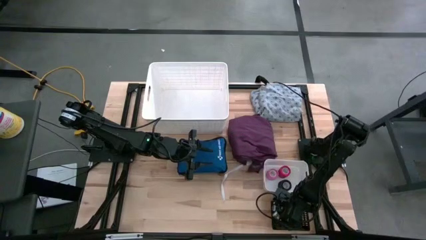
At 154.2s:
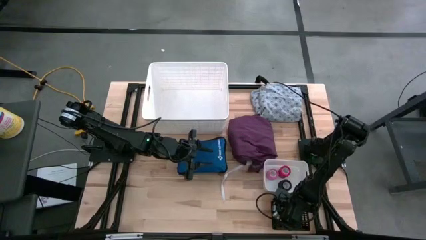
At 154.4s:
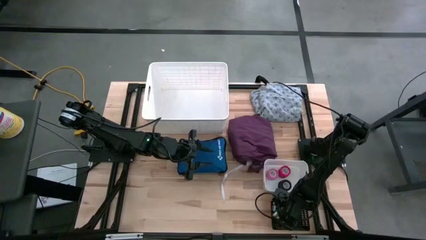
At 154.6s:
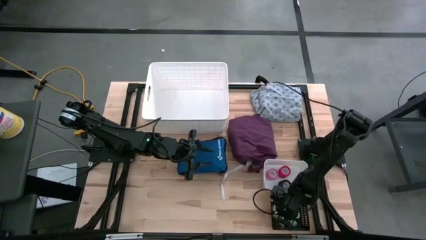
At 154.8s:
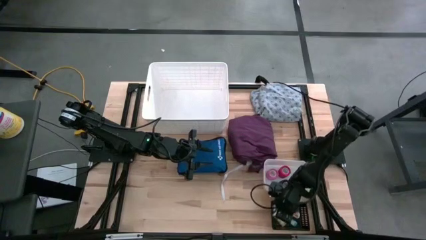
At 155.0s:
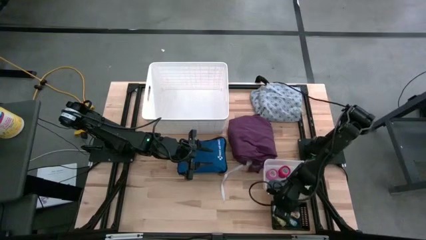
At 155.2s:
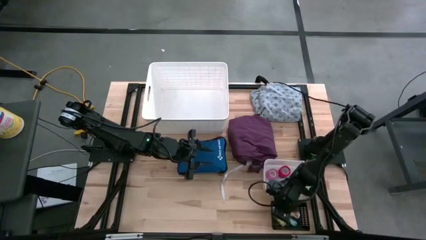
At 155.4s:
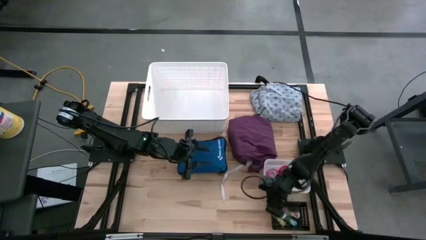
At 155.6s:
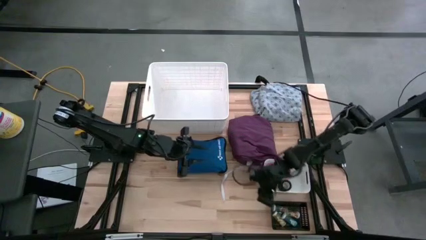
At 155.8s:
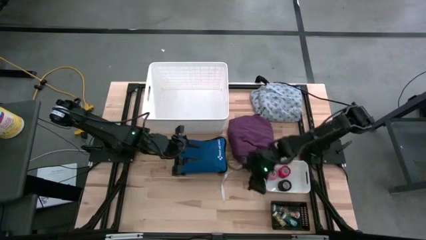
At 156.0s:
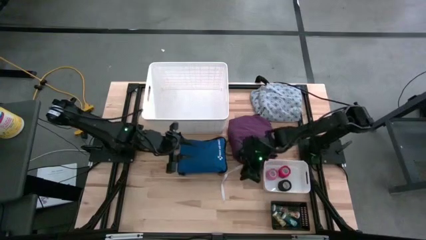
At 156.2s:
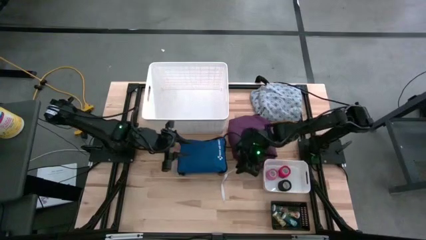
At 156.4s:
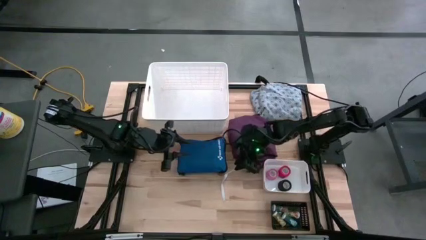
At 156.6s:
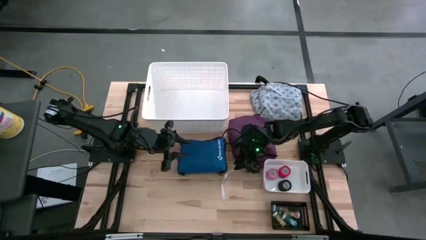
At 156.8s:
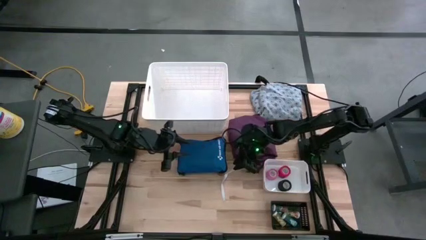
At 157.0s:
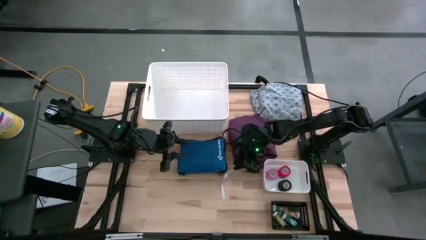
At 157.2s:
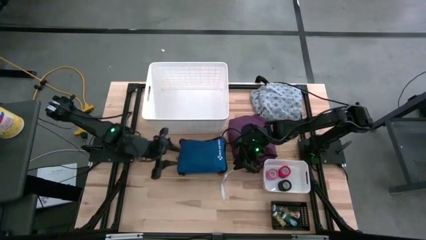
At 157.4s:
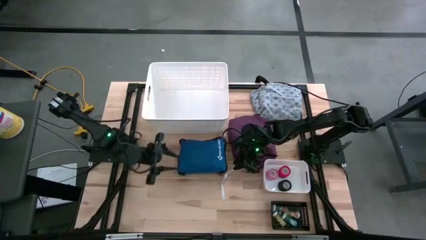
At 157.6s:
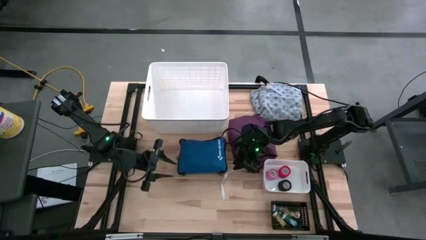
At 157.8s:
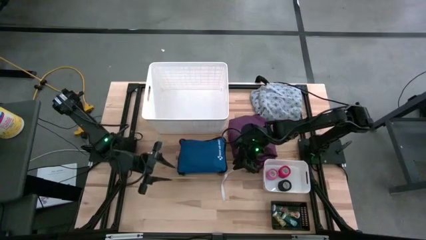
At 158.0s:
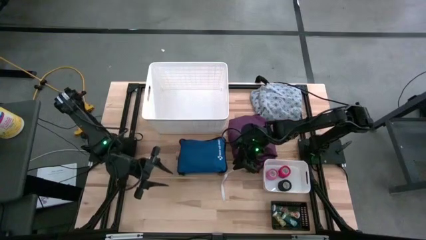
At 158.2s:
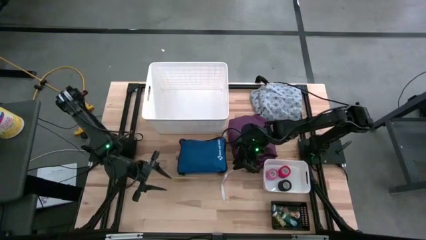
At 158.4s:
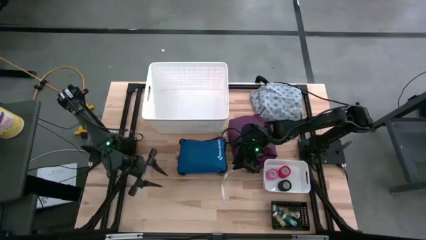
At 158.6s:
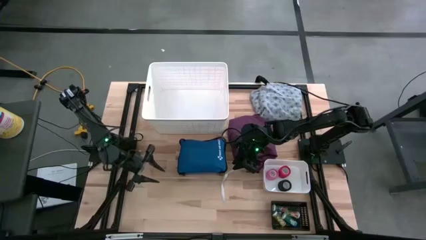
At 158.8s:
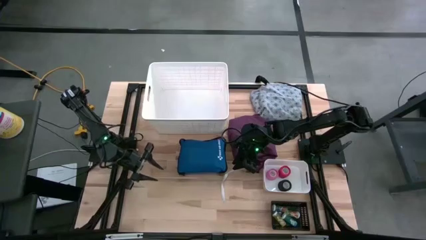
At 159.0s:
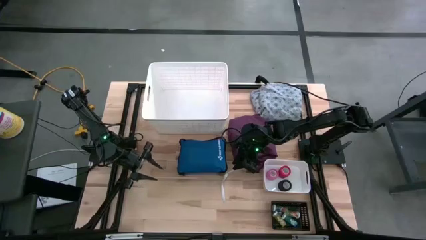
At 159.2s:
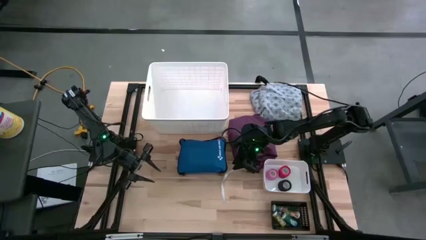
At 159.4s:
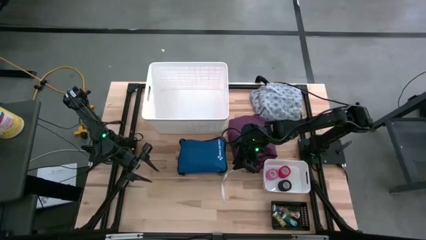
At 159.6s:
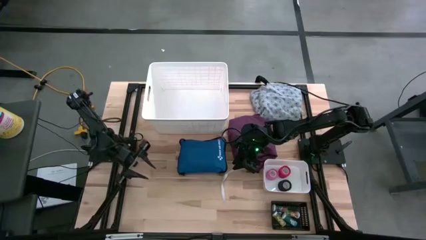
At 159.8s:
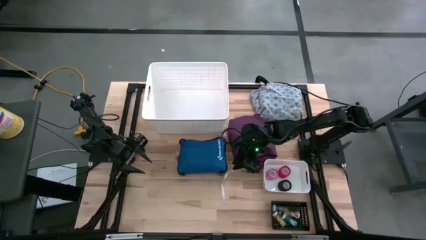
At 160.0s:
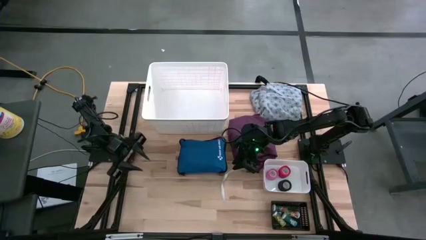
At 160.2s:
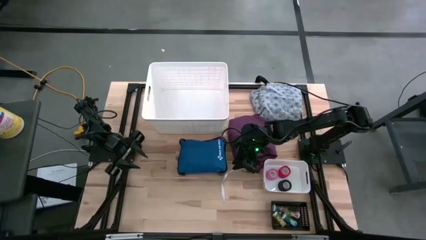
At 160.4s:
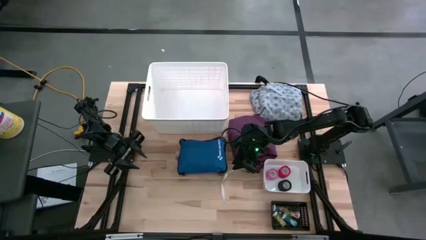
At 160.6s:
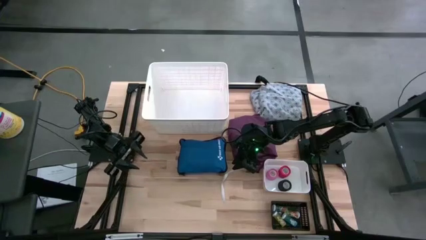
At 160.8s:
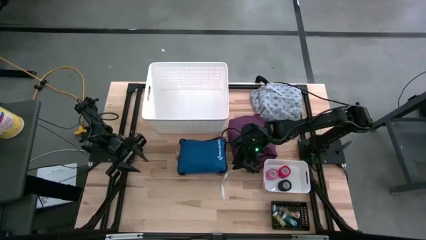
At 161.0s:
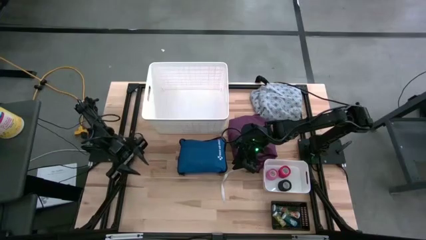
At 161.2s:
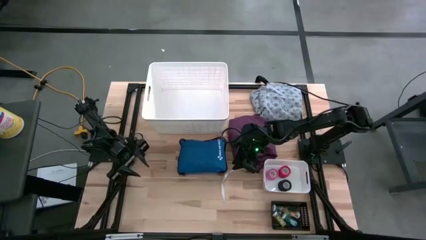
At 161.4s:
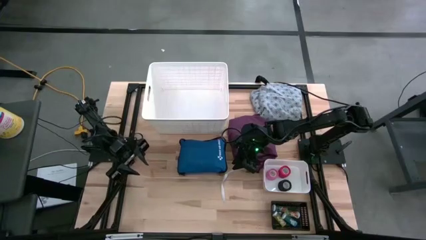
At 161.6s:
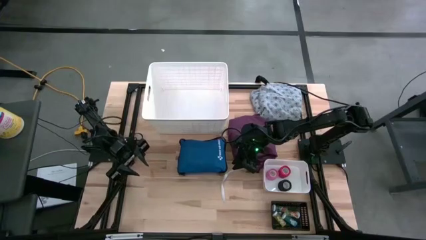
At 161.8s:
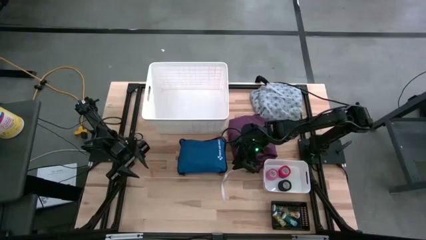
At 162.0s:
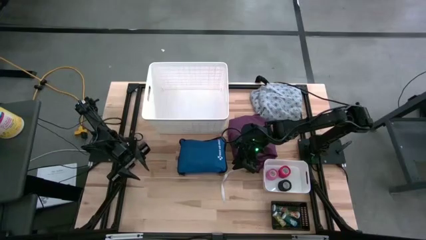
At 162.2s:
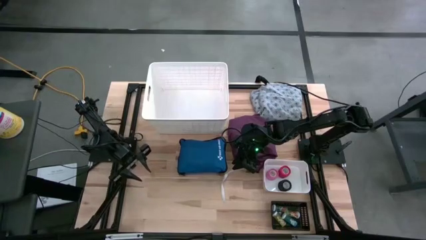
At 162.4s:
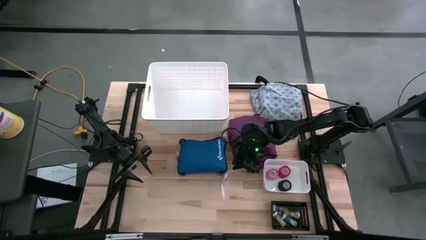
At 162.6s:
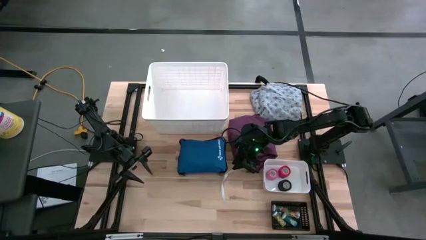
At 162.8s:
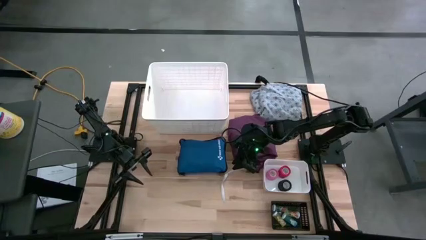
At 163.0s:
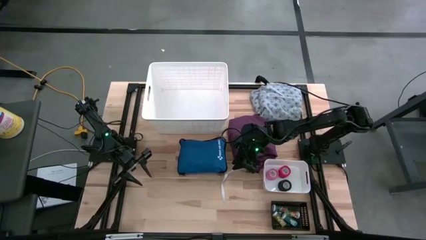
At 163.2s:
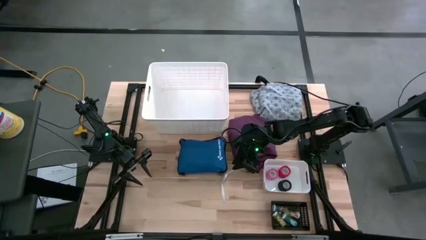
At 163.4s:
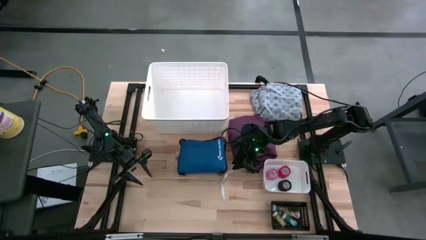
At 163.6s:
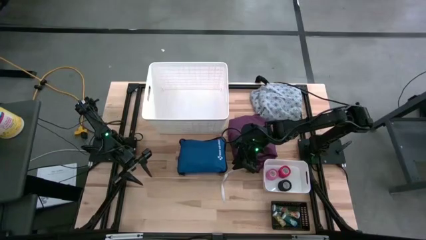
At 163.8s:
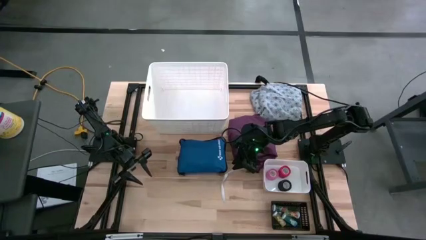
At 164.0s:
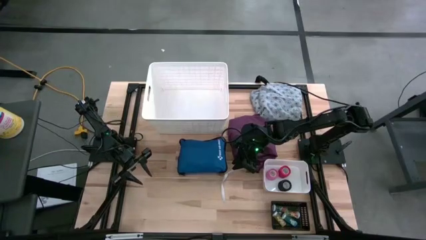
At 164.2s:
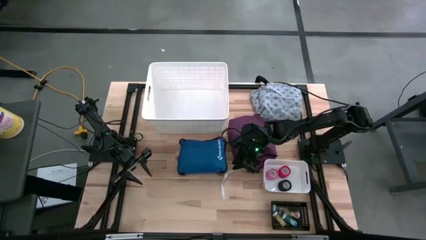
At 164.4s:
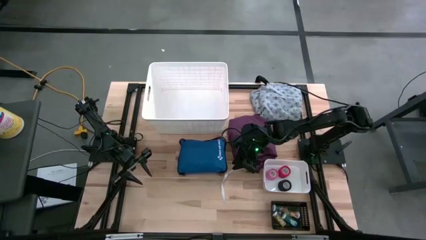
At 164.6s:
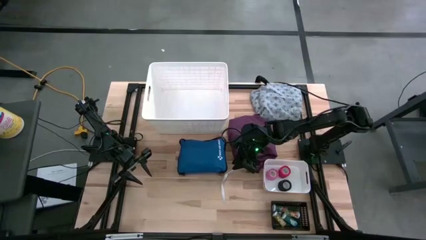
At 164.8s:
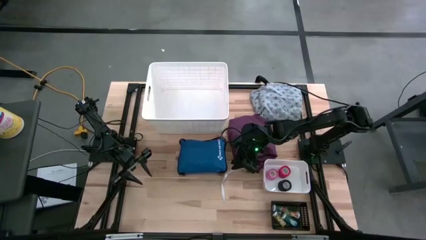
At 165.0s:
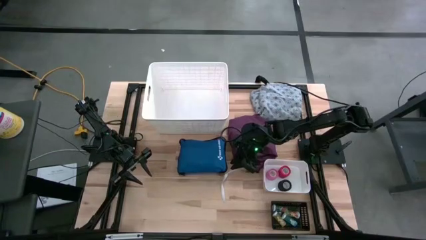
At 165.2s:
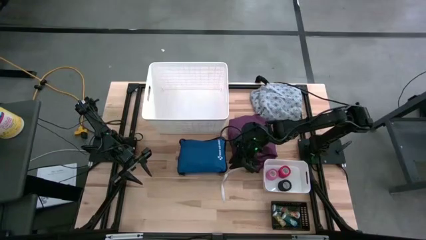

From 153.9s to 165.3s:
Task: Pick & Place Medicine items
Put the violet patient gown into the white laundry bin

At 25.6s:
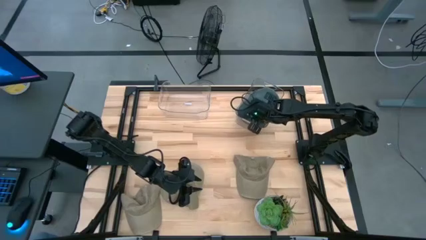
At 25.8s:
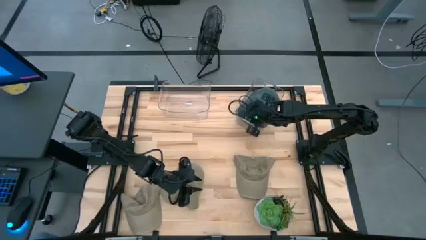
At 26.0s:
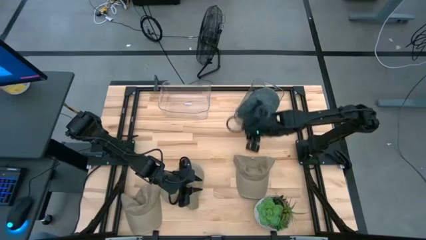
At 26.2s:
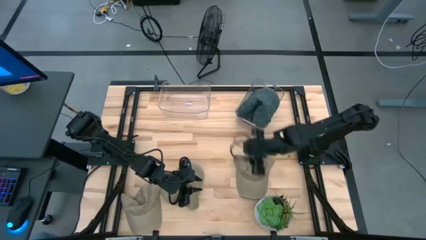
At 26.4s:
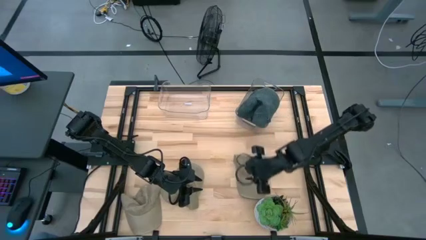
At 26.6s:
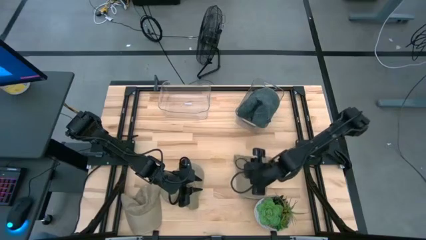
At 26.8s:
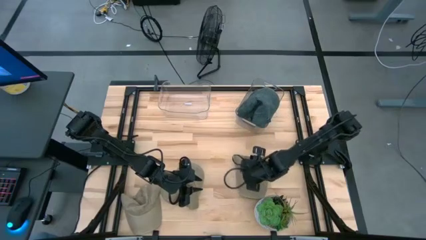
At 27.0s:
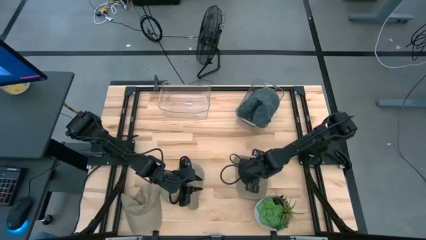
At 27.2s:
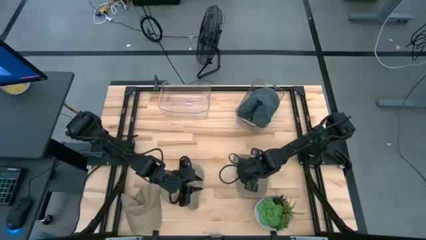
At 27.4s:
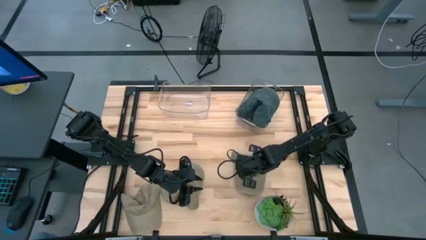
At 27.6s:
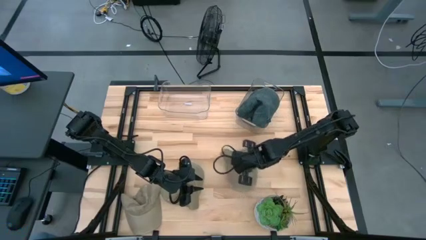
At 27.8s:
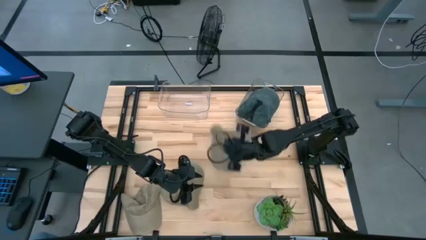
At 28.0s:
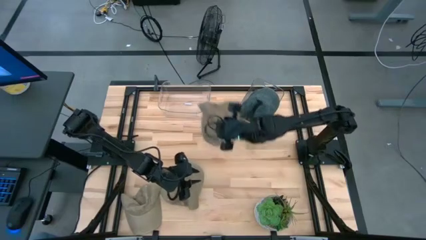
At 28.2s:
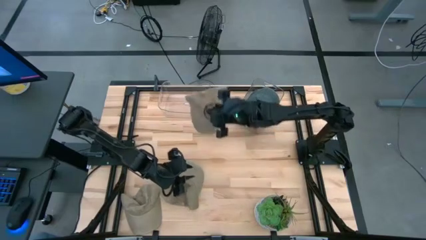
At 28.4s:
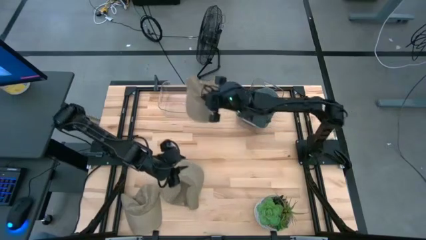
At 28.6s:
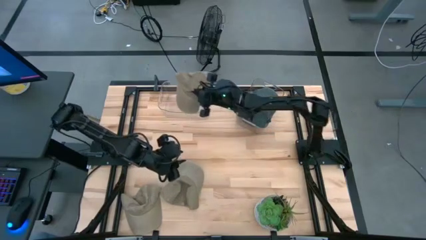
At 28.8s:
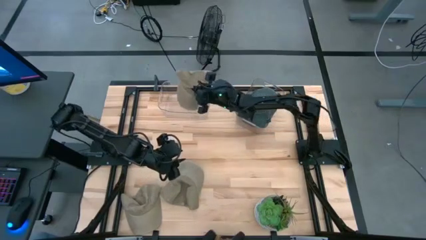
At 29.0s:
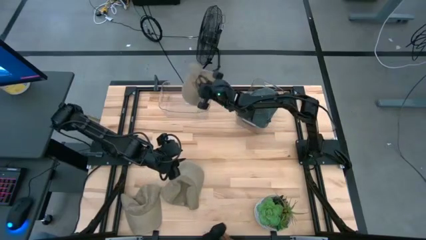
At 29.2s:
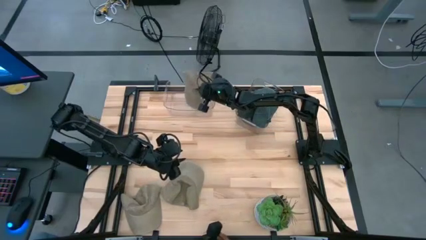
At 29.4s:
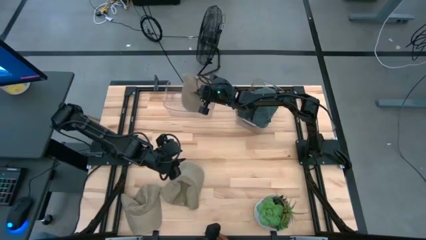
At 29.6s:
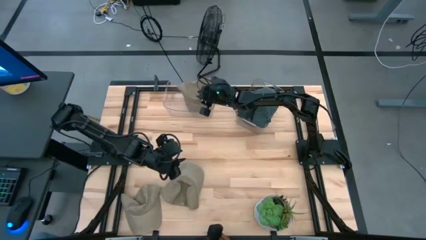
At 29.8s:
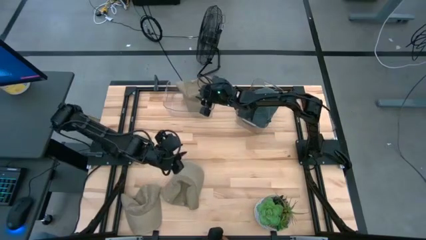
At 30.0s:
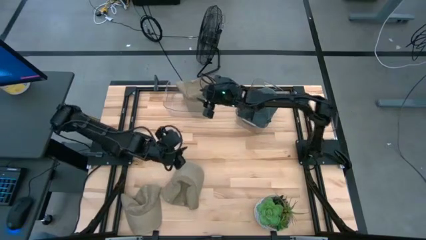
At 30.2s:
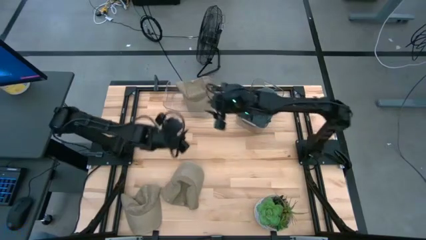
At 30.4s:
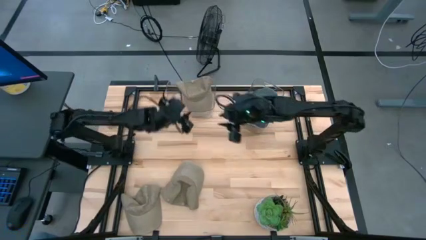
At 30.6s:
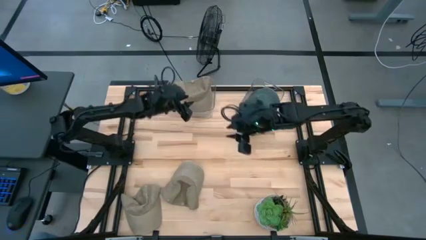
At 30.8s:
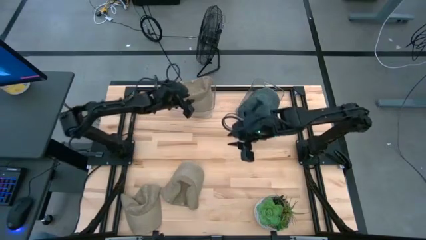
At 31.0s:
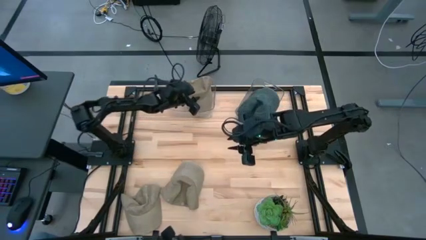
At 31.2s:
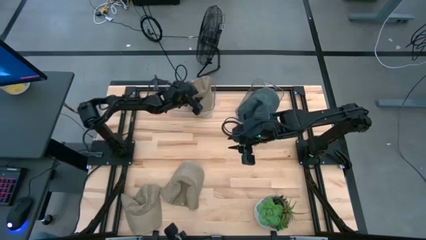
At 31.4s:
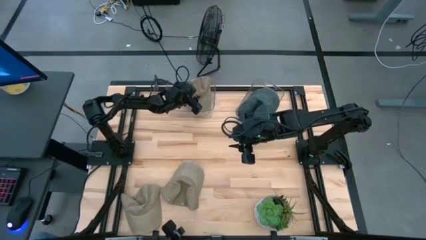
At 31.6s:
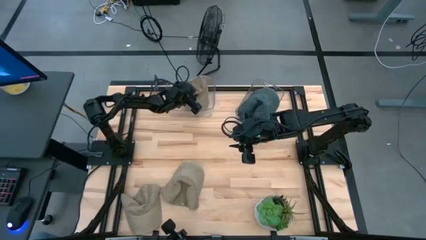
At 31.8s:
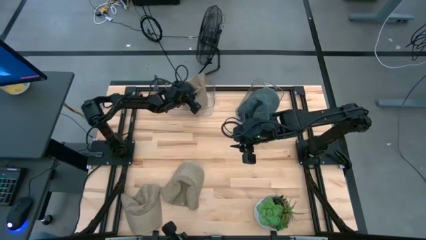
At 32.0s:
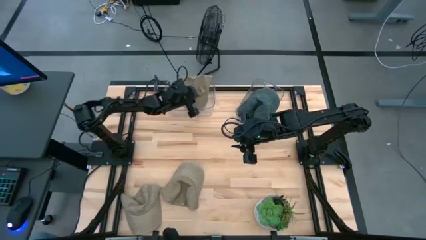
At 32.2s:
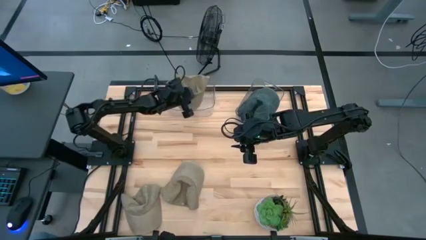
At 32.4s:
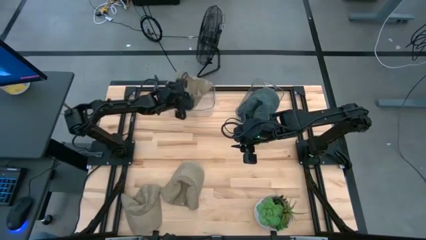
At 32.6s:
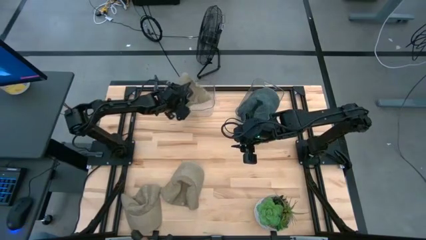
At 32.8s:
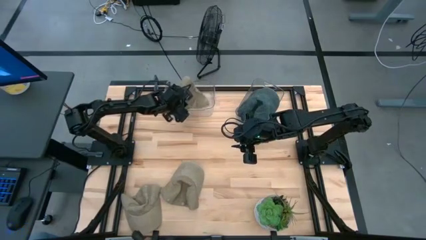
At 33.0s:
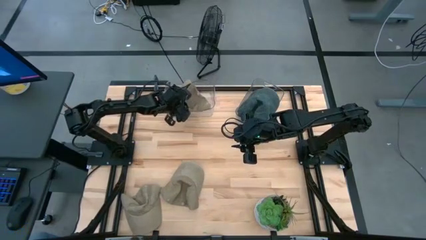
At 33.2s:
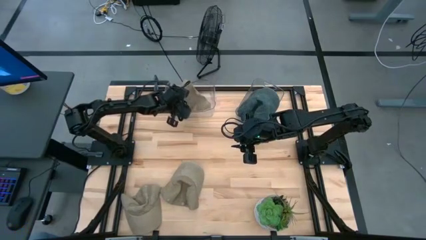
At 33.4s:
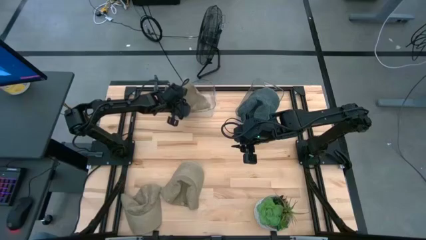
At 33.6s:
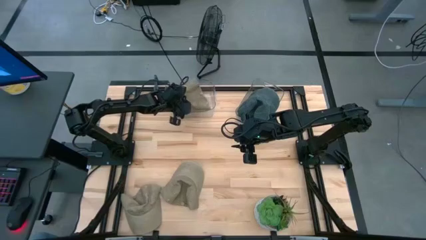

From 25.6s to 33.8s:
Task: Pick & Place hat
Put the right brown cap into the left transparent bin
